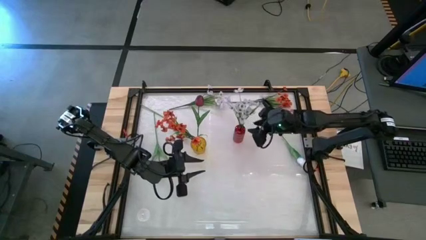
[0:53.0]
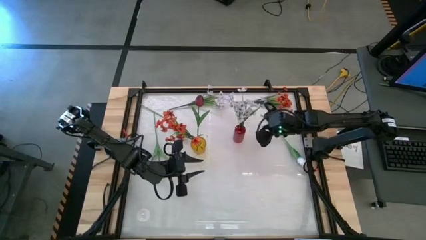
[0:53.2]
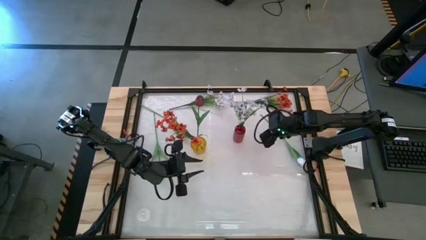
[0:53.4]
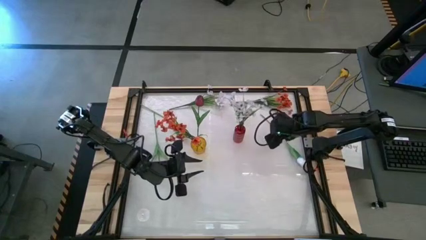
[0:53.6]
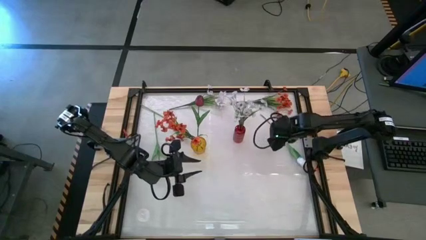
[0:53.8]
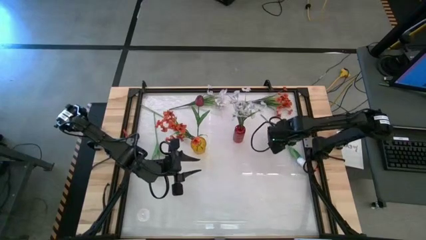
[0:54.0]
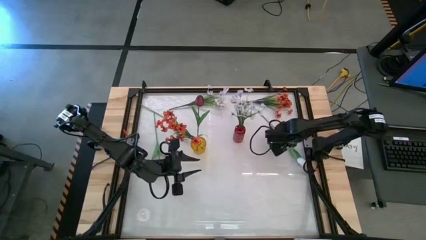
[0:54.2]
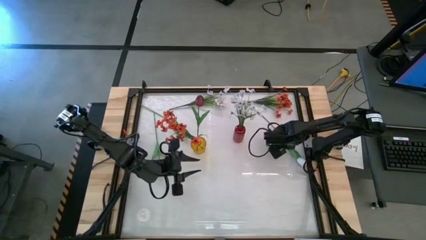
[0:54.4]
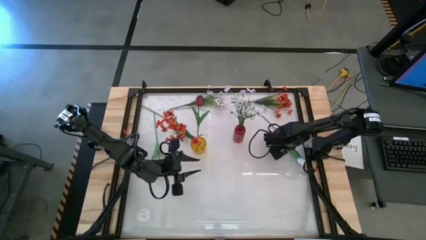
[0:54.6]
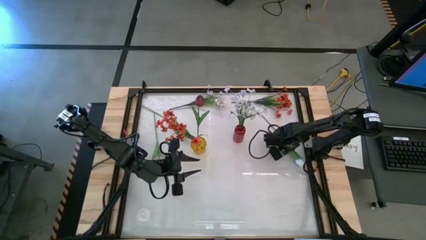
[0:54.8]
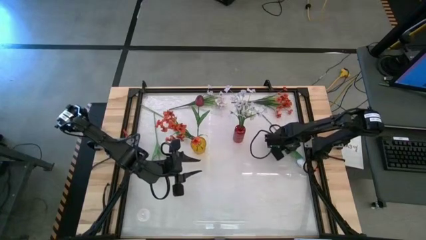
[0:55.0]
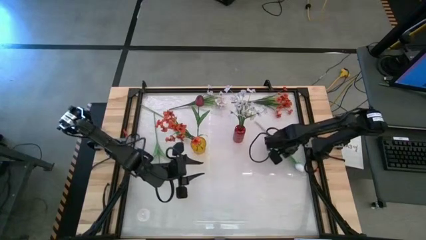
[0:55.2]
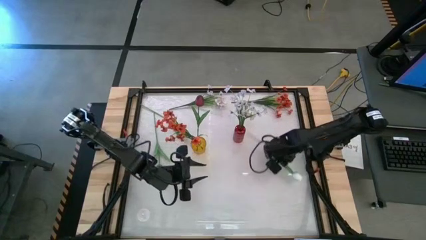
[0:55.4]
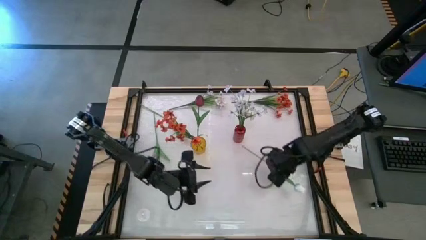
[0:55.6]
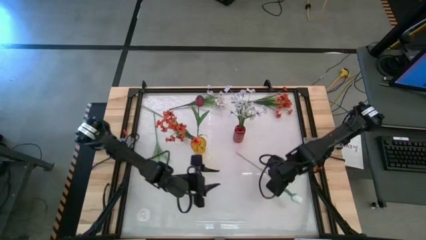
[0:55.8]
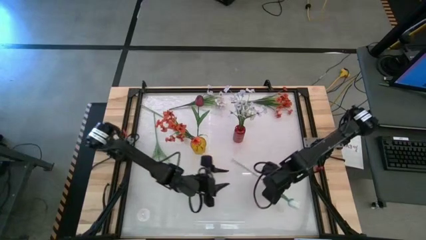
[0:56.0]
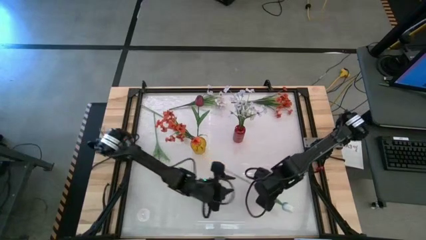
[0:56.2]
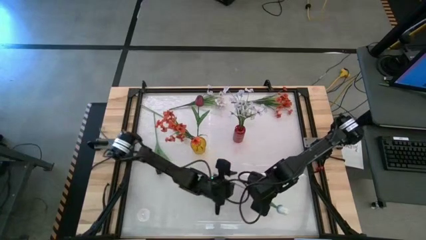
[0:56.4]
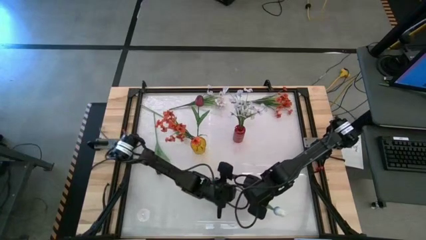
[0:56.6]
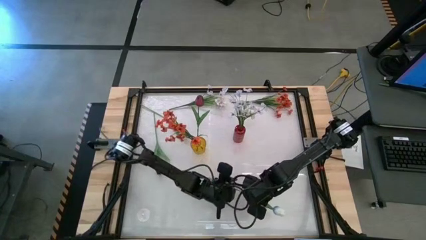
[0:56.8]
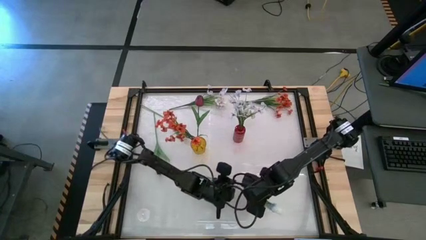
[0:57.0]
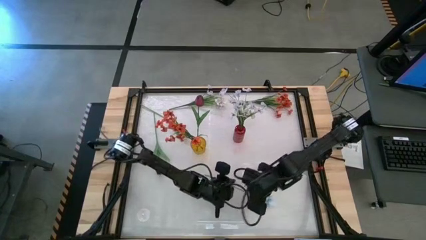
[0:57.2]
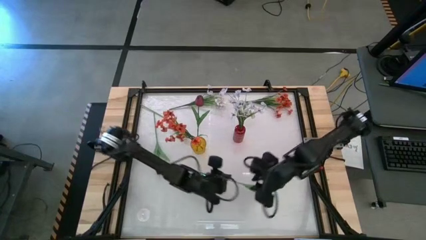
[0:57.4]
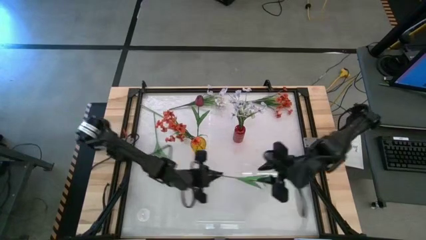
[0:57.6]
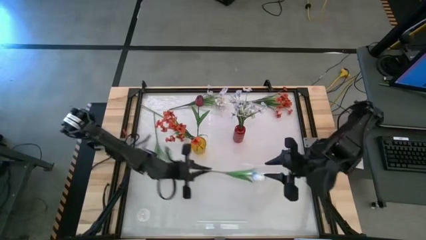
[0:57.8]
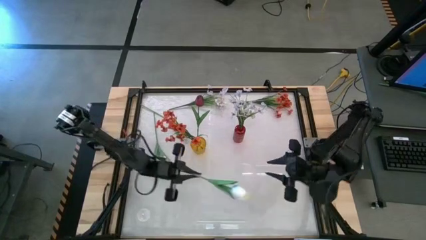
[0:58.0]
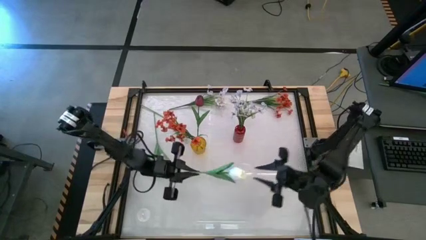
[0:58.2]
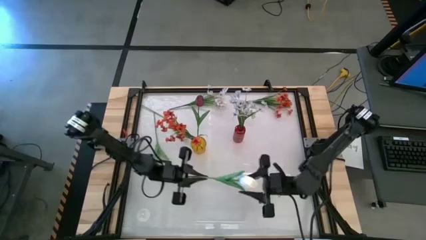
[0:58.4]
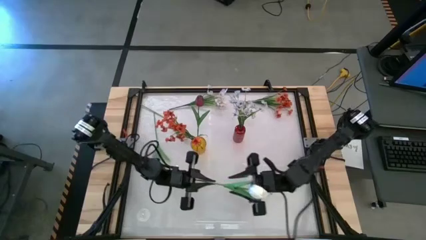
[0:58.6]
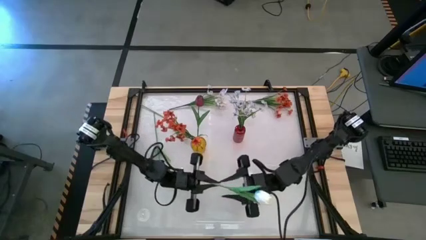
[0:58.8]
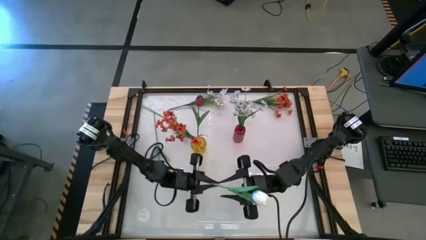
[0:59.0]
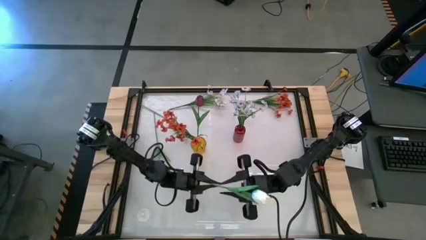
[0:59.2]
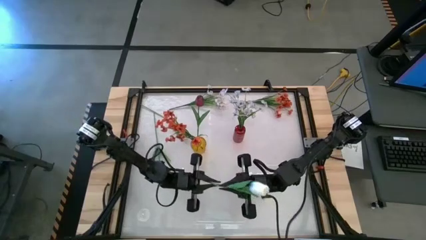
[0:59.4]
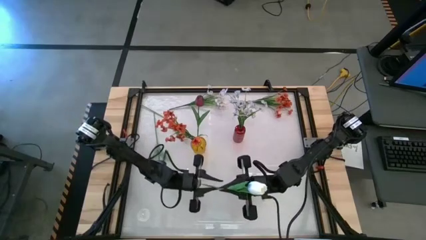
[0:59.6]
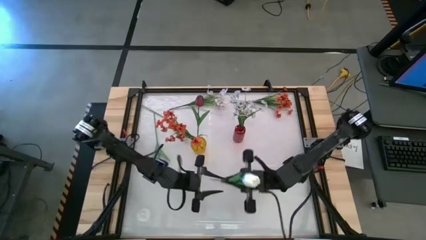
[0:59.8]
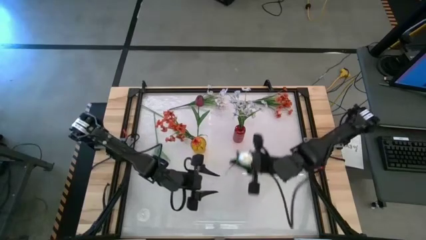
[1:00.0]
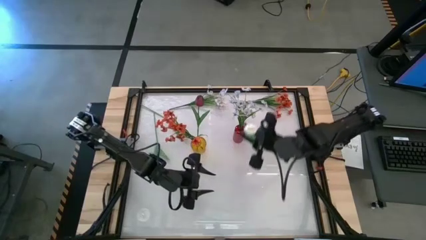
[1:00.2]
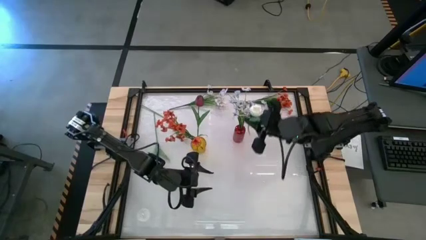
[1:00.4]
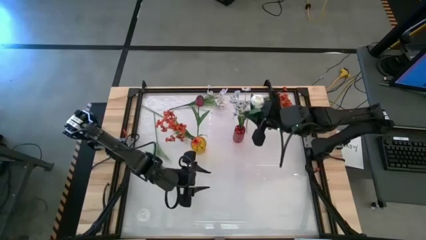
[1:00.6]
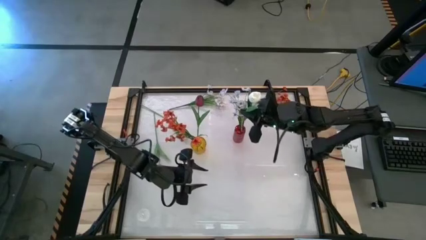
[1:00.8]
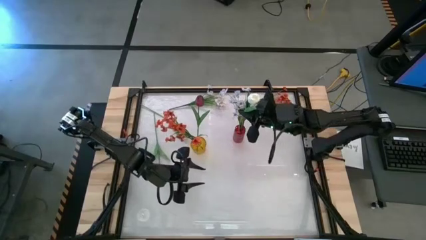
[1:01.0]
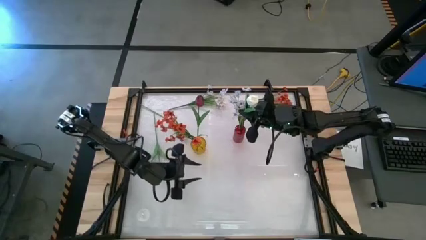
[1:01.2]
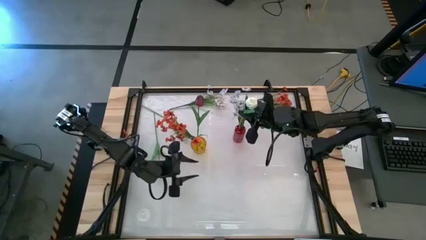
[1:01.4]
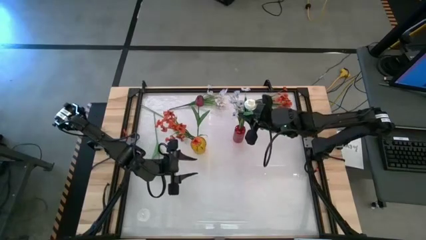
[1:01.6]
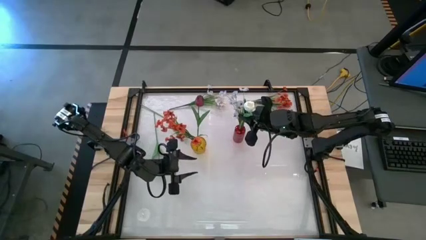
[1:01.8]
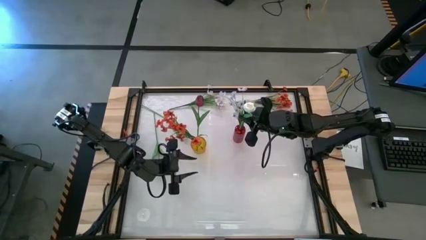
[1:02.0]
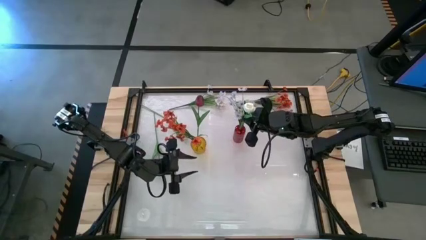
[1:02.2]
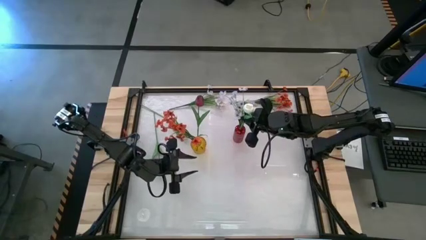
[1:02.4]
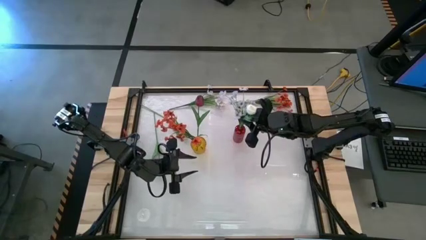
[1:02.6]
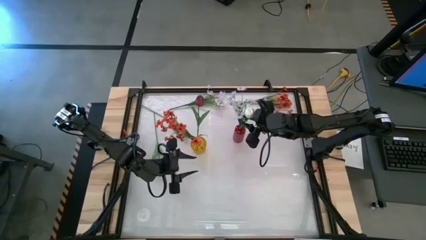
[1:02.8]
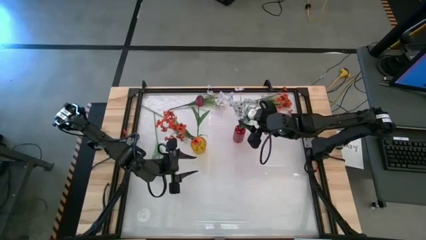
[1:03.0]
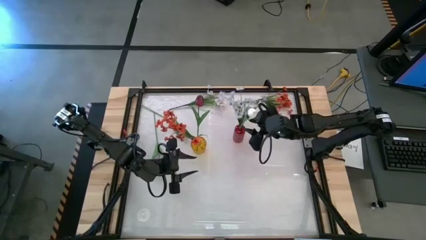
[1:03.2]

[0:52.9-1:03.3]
Task: Sort flowers into vase by color
Put the right white tulip into the red flower vase

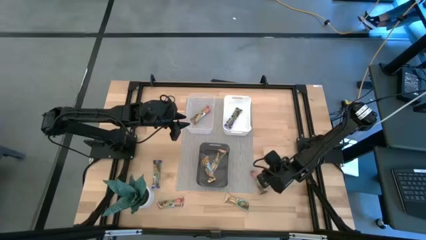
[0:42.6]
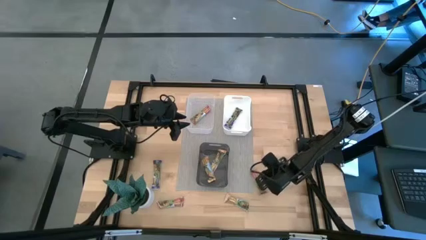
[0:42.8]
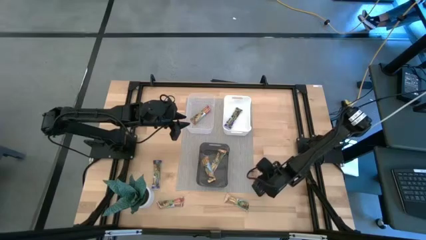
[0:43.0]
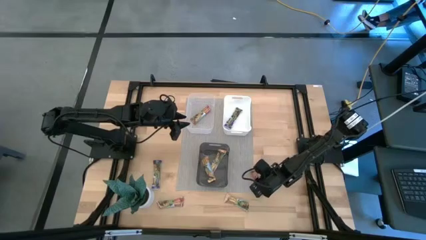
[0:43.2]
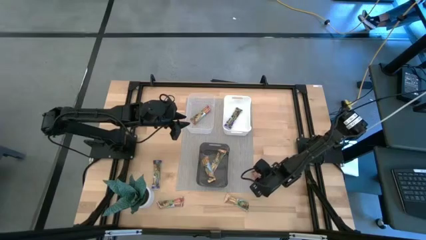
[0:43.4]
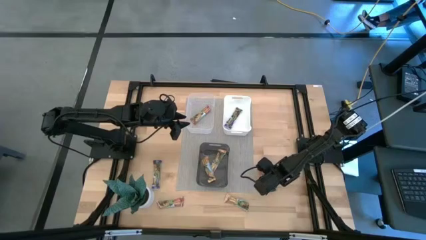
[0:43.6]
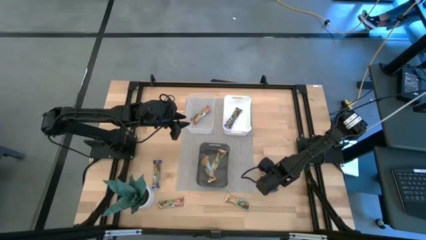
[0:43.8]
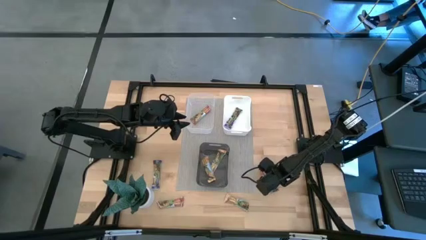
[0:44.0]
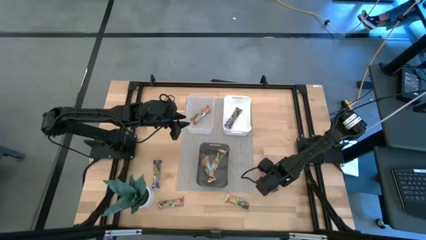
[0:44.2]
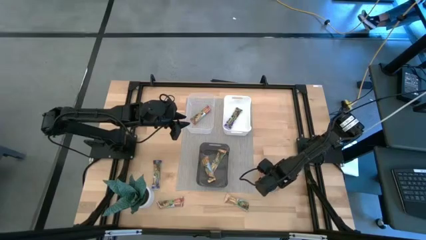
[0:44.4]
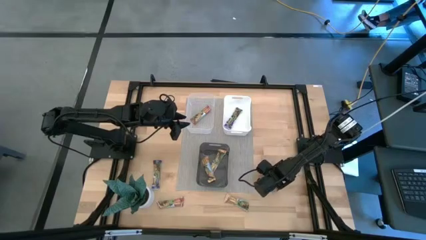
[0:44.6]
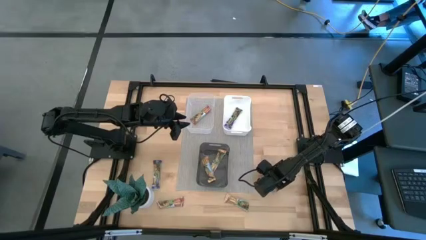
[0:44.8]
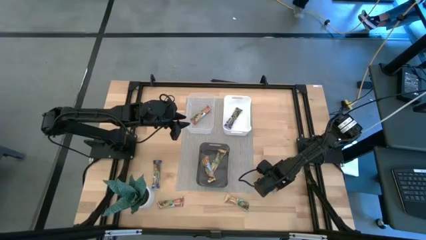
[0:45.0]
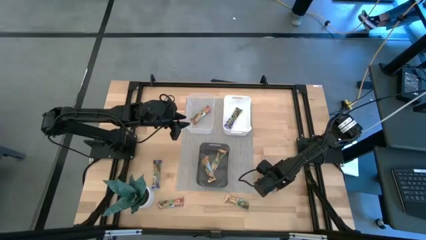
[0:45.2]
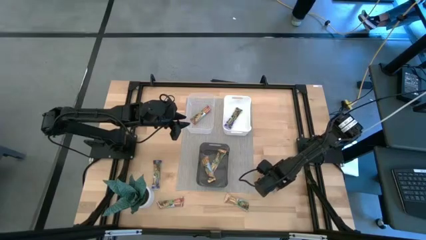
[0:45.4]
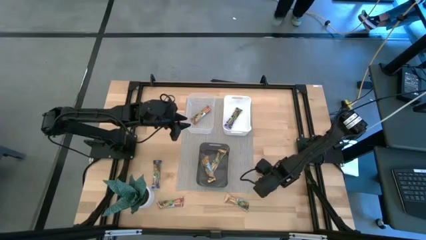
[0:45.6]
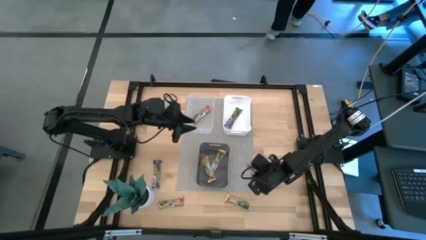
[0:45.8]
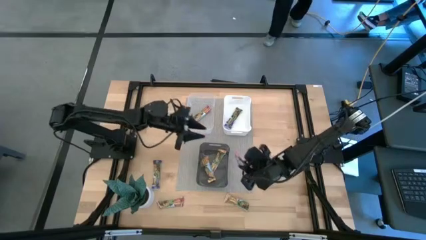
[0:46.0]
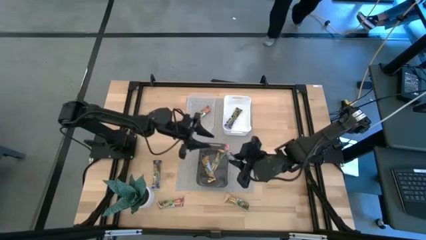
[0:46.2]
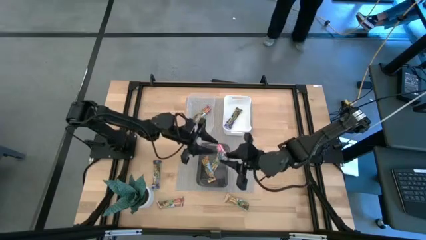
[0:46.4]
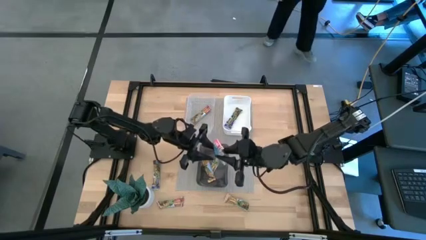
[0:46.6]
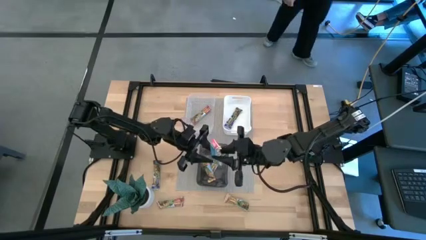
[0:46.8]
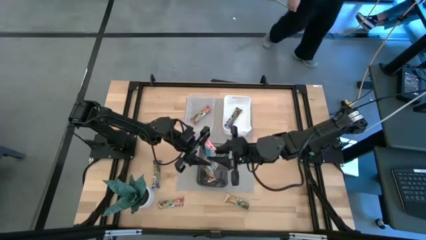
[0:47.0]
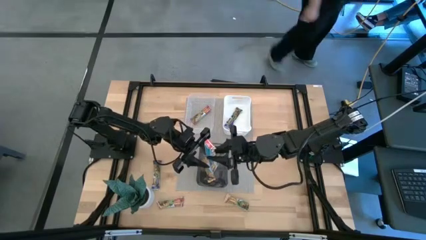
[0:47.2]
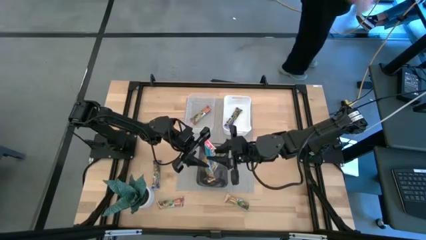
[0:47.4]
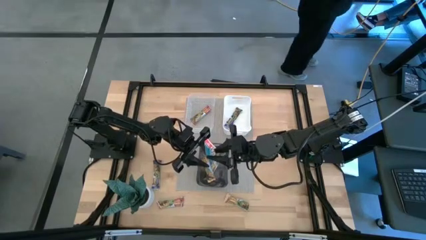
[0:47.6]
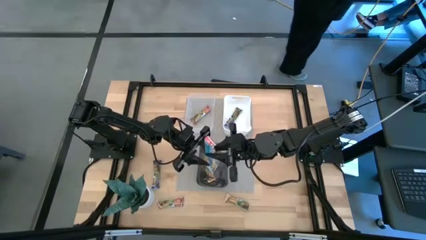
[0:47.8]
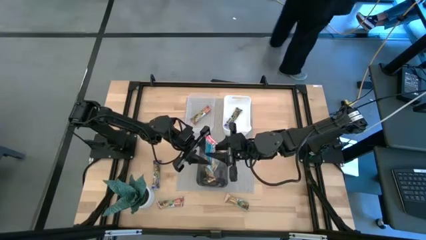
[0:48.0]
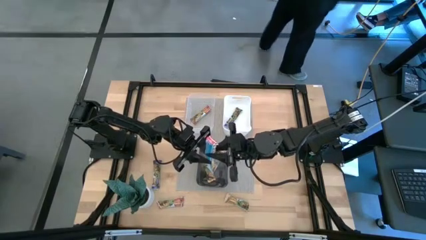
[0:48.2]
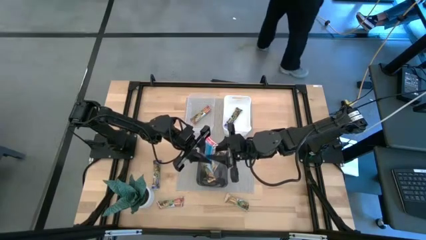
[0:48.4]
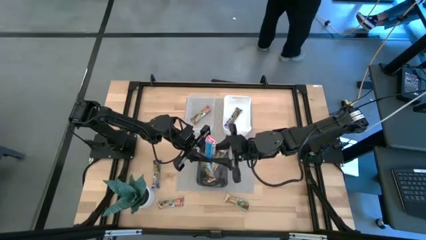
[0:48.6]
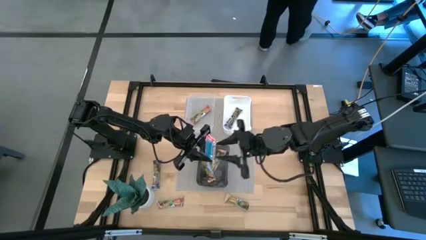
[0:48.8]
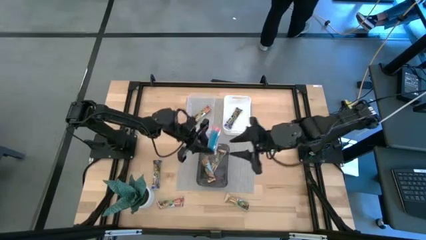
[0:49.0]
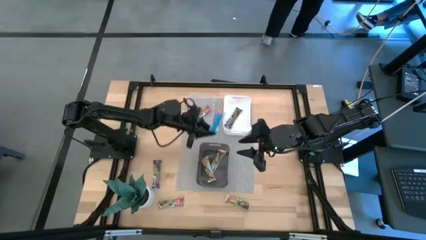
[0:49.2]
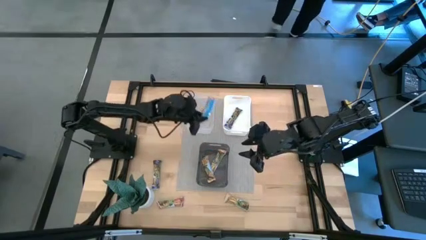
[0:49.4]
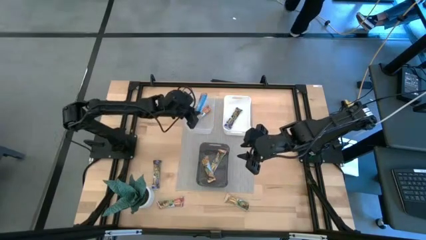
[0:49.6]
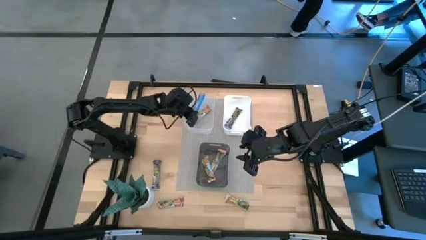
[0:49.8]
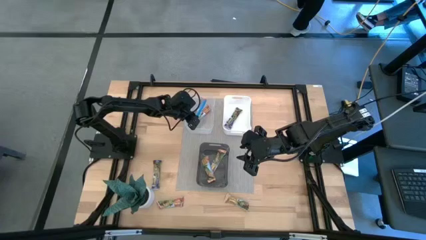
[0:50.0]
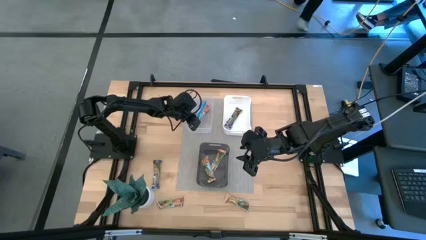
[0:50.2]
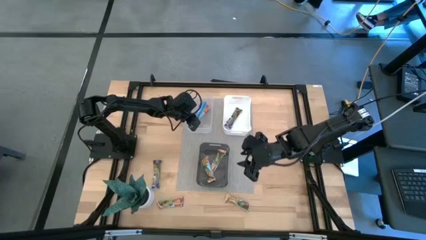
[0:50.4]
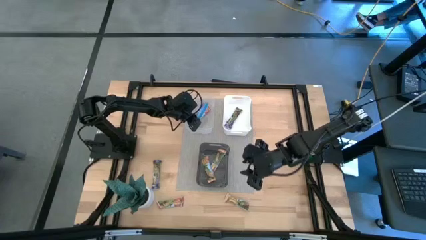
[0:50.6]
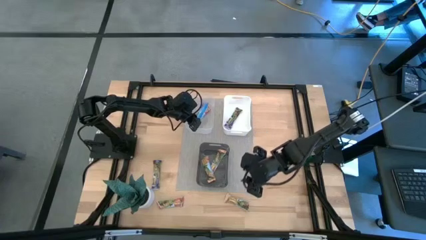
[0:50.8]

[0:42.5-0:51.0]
Task: Pick and place Granola Bars by type
Put the right red granola bar into the transparent bin
